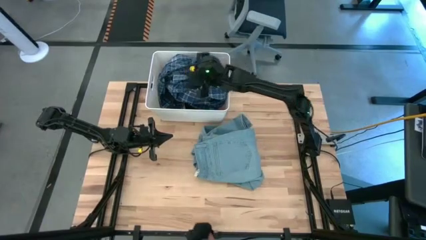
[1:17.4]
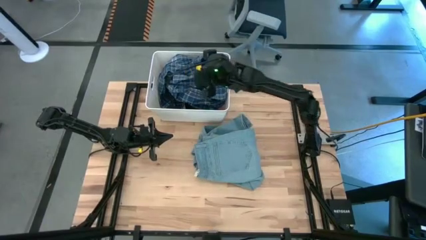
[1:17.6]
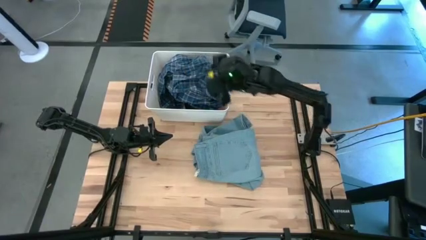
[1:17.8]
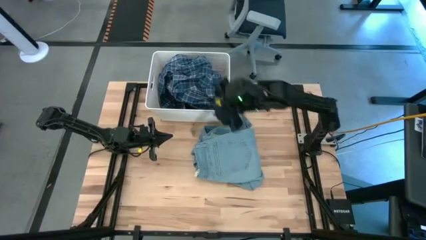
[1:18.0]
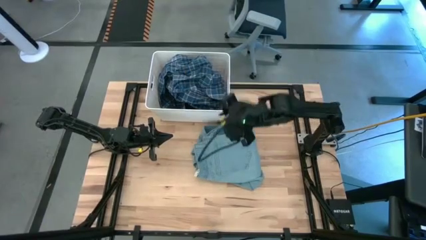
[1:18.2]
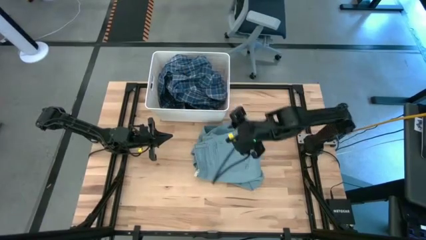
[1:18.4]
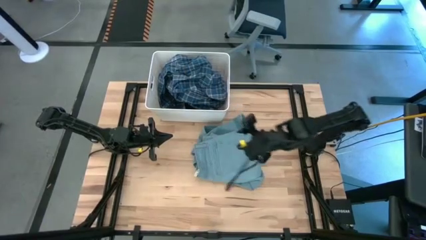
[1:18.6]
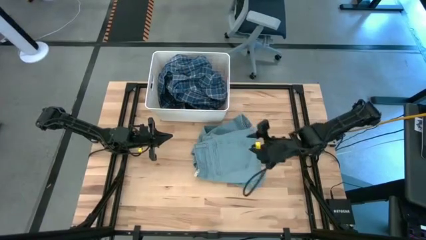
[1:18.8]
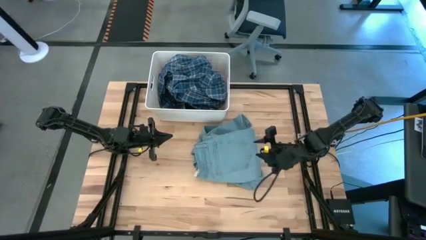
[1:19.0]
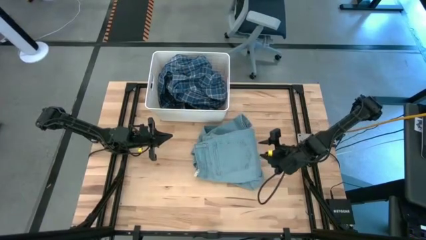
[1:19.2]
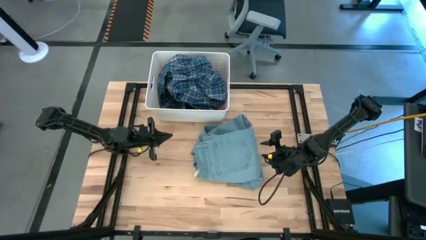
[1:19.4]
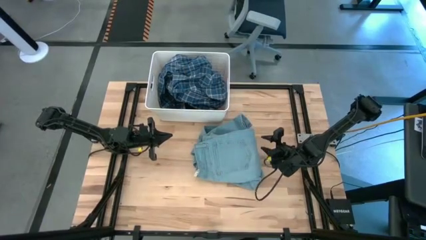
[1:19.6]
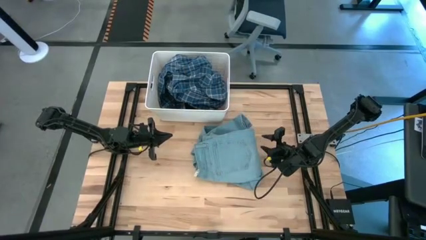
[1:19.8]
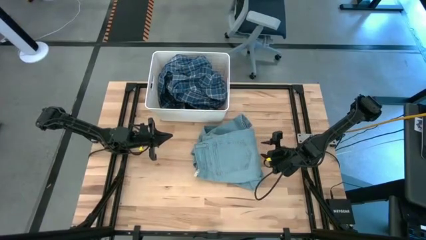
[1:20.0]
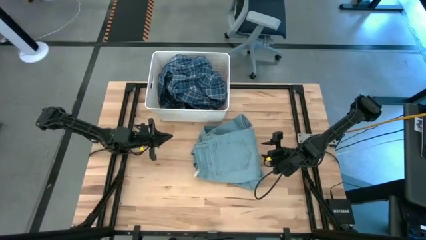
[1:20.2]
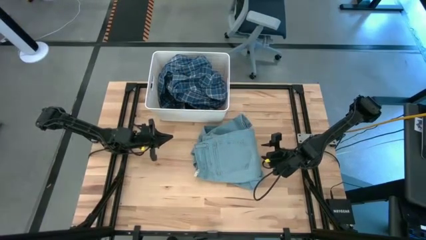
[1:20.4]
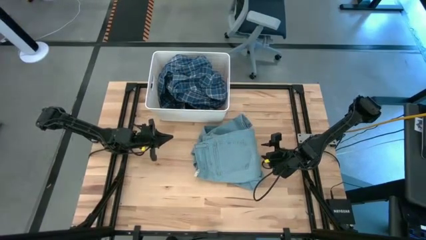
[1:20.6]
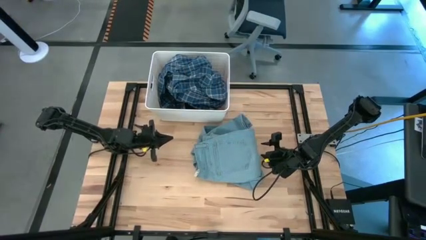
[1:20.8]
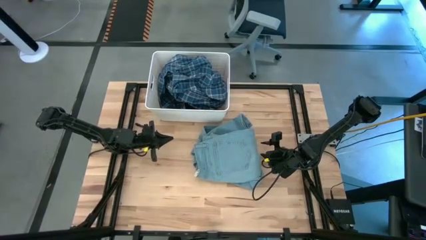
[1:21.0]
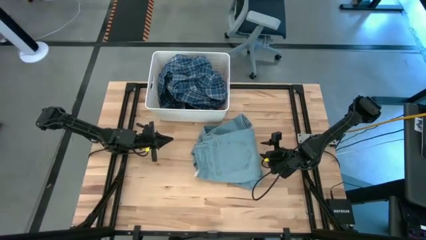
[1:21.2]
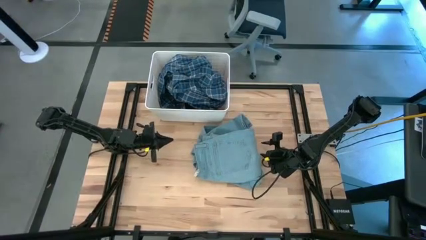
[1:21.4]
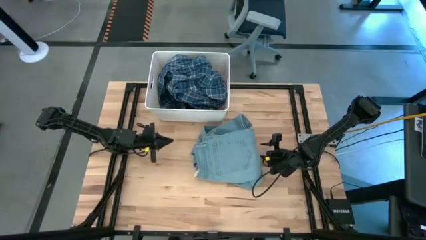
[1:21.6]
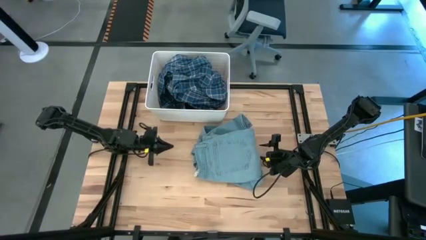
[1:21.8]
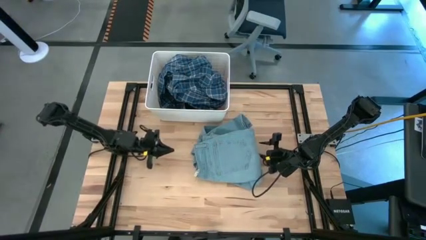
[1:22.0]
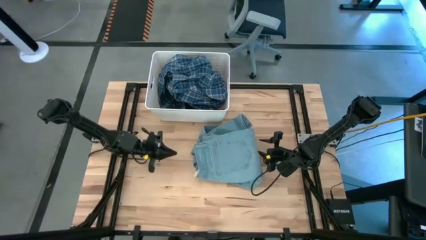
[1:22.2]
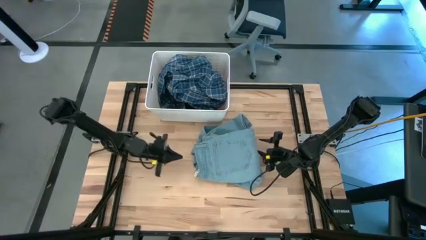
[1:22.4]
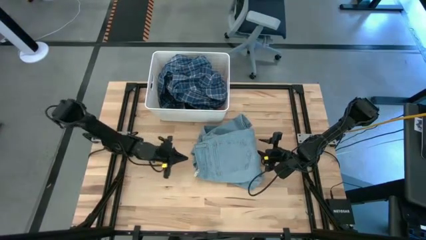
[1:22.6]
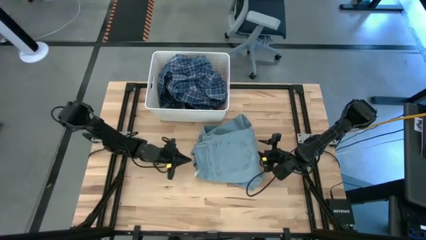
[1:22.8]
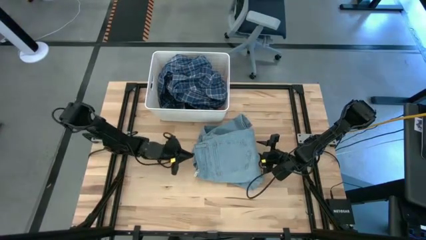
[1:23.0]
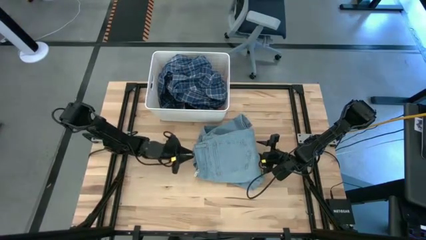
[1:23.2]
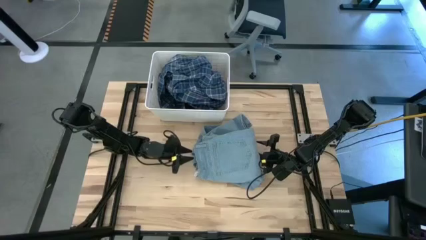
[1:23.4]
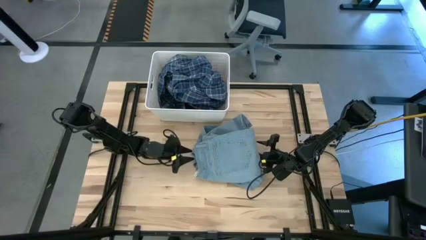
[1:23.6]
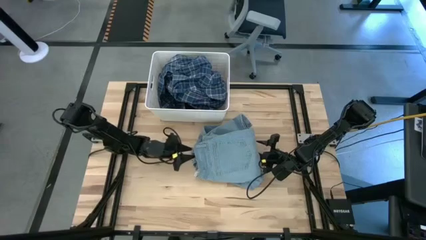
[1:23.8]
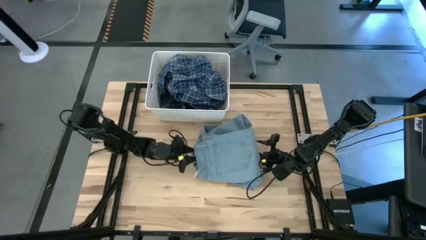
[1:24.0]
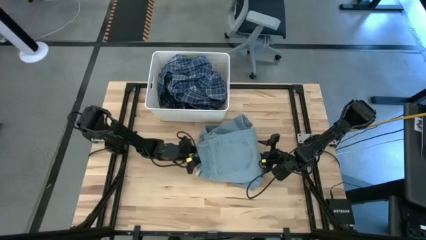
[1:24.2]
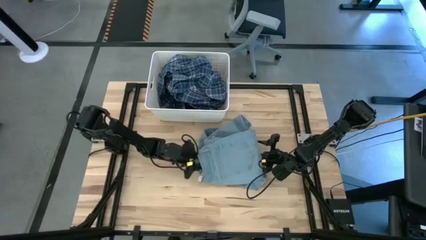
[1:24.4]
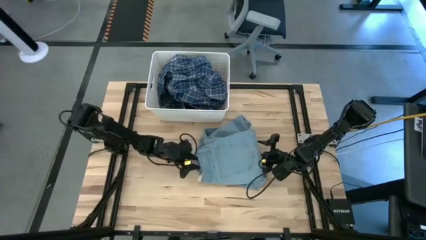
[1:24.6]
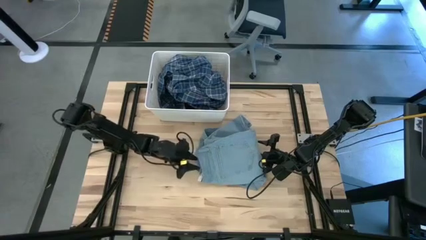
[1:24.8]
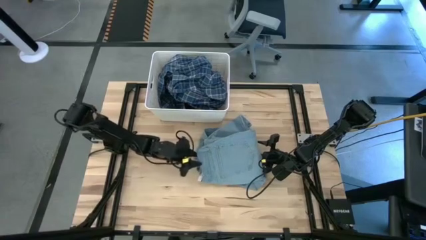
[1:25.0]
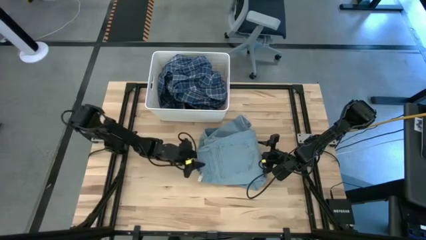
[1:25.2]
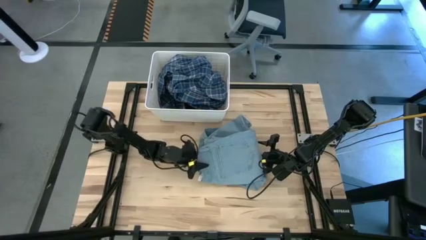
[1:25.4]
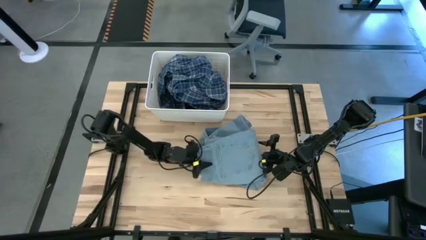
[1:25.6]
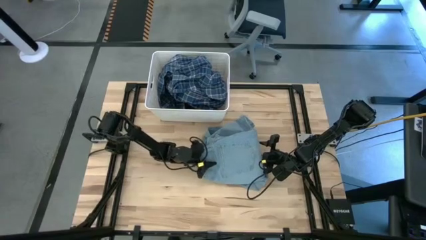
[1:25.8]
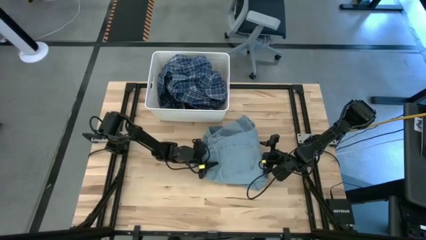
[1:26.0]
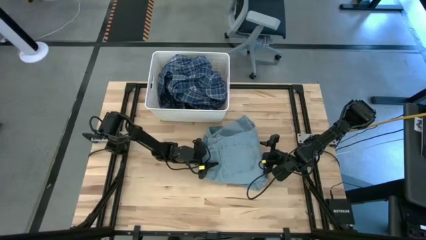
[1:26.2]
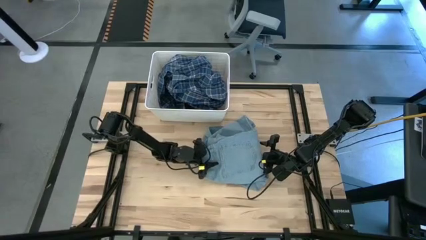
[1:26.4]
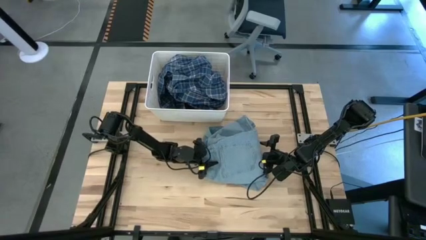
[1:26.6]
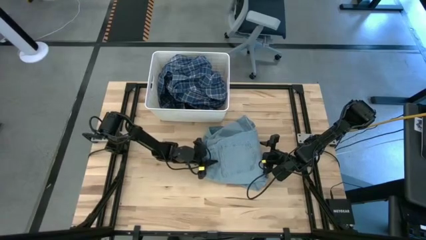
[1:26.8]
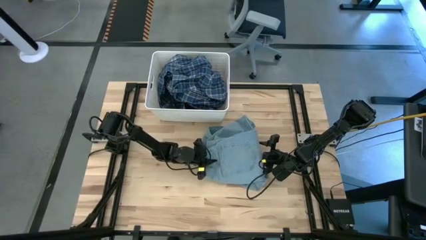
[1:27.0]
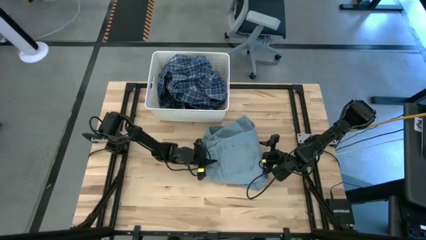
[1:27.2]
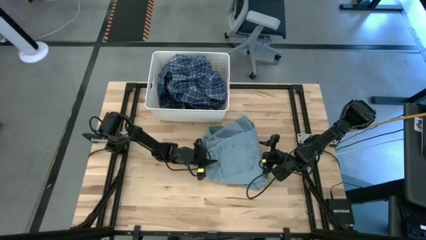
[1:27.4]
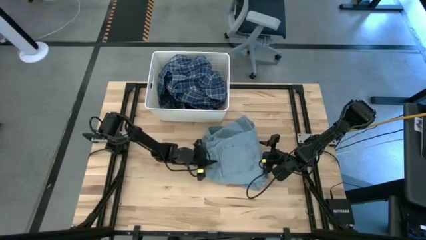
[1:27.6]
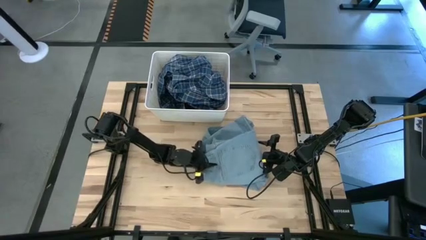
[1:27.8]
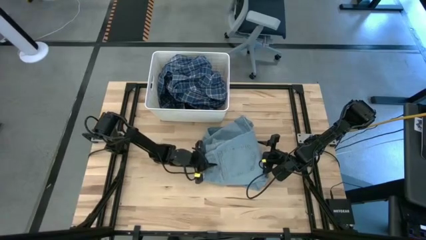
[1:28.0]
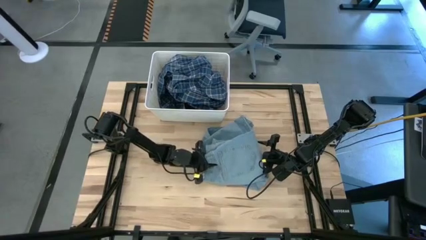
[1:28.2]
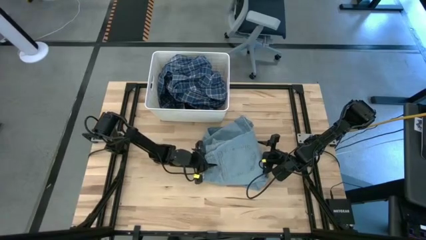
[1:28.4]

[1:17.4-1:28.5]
Task: Sort clothes
Put the blue pants into the white bin

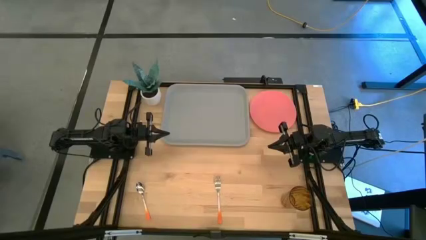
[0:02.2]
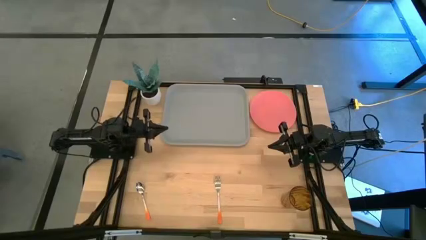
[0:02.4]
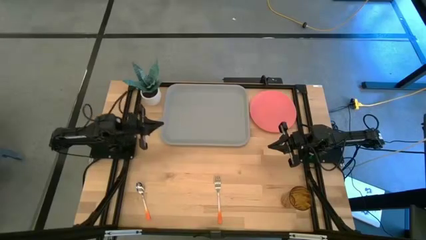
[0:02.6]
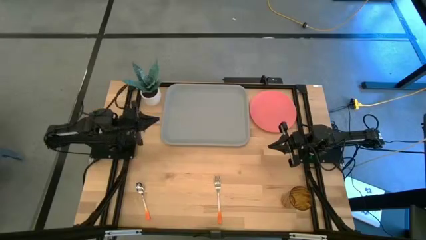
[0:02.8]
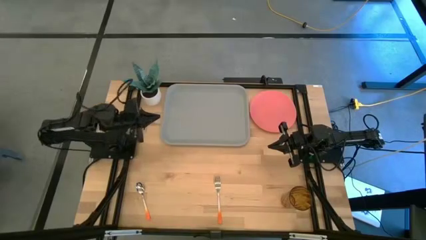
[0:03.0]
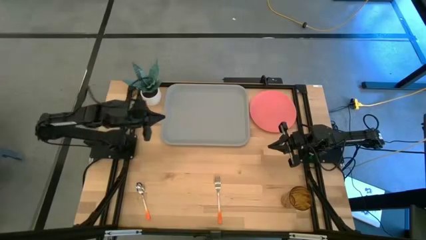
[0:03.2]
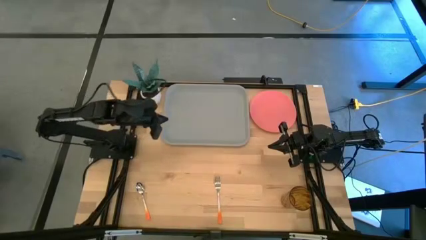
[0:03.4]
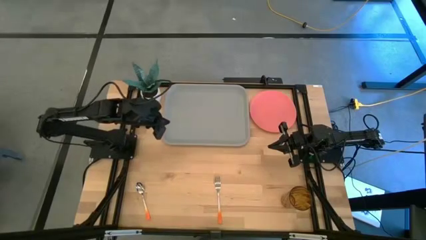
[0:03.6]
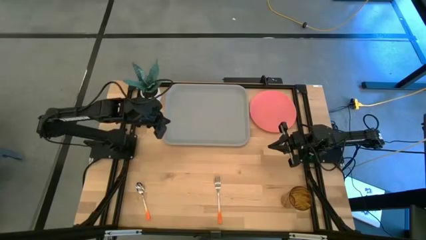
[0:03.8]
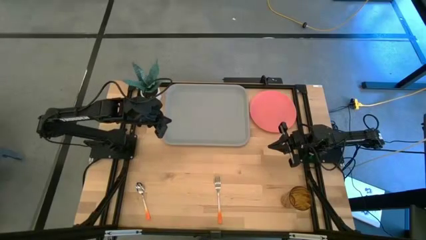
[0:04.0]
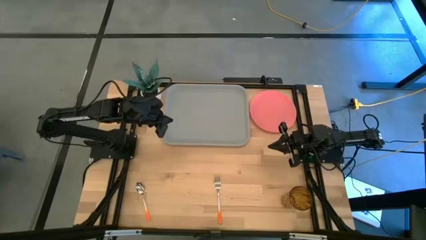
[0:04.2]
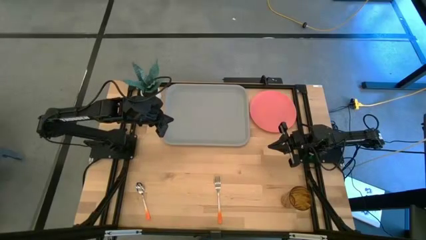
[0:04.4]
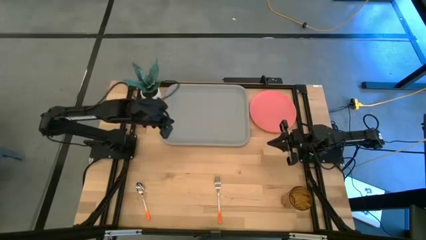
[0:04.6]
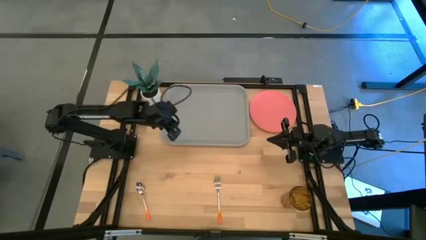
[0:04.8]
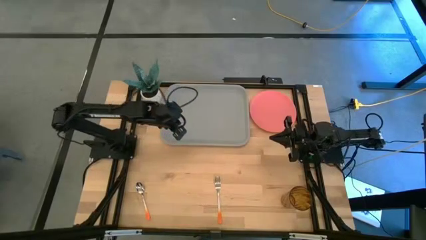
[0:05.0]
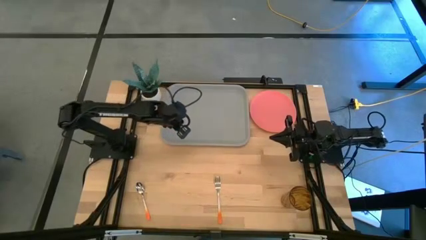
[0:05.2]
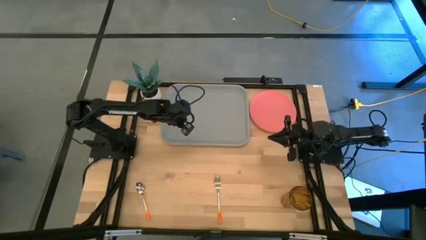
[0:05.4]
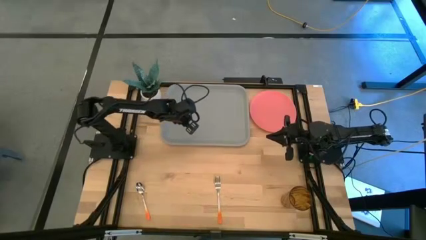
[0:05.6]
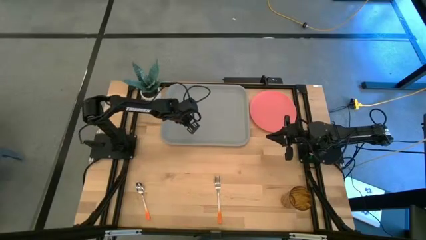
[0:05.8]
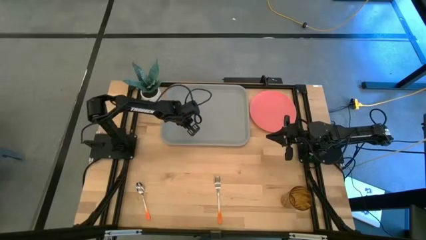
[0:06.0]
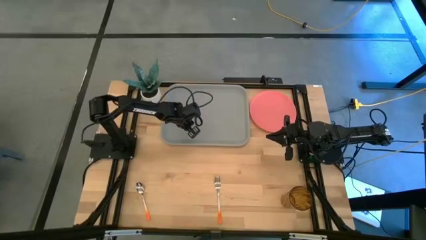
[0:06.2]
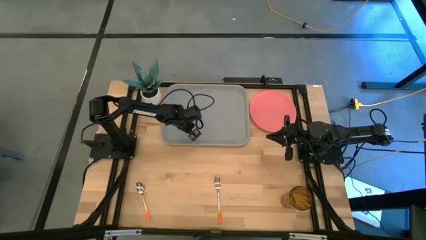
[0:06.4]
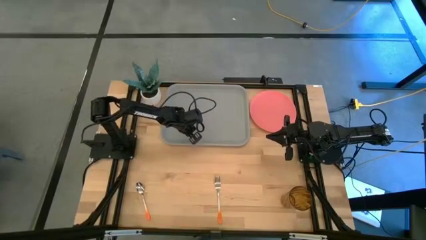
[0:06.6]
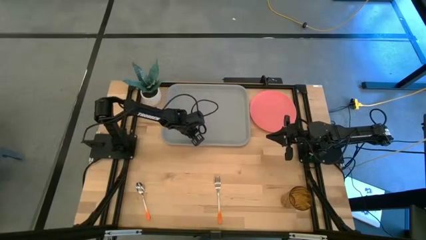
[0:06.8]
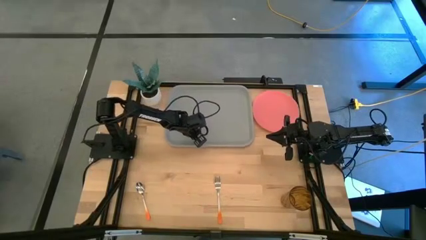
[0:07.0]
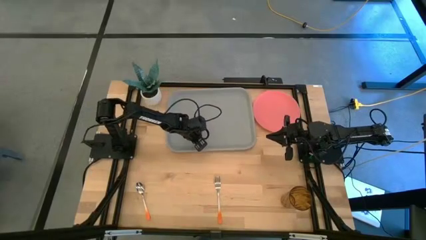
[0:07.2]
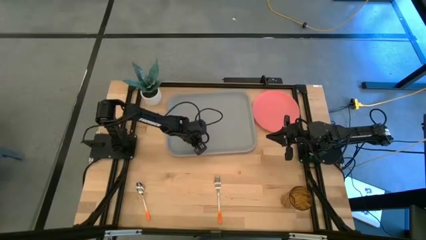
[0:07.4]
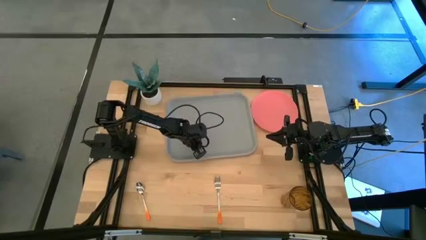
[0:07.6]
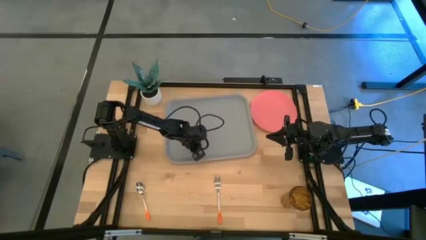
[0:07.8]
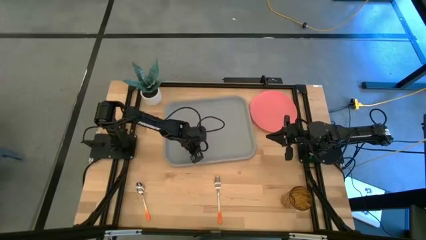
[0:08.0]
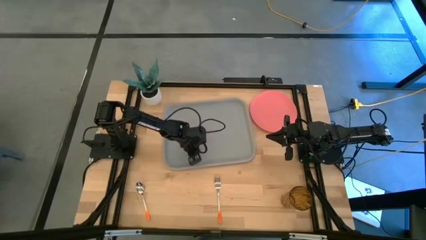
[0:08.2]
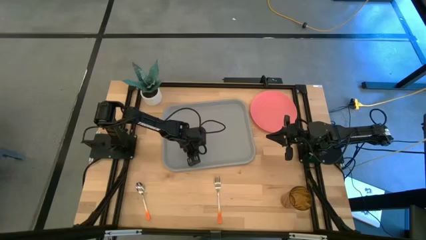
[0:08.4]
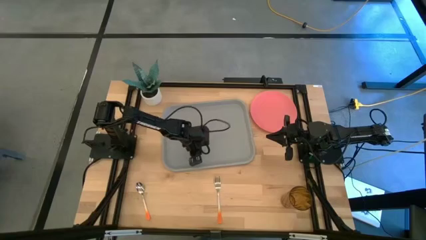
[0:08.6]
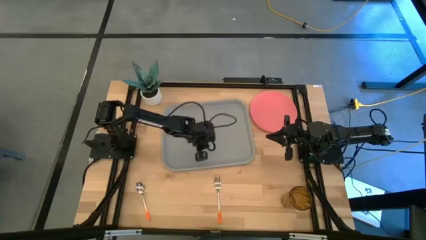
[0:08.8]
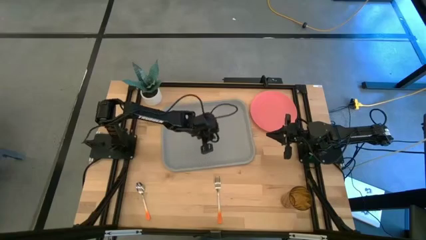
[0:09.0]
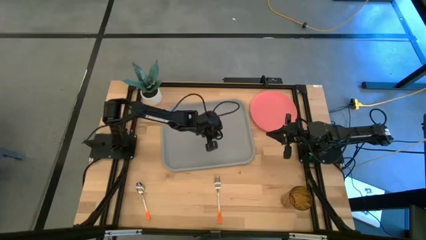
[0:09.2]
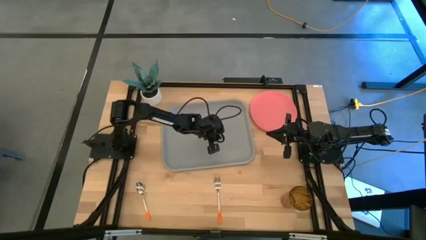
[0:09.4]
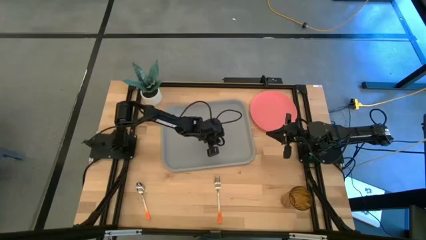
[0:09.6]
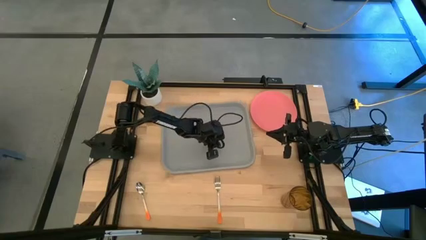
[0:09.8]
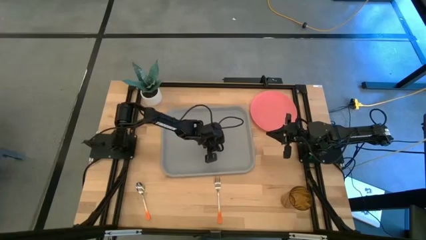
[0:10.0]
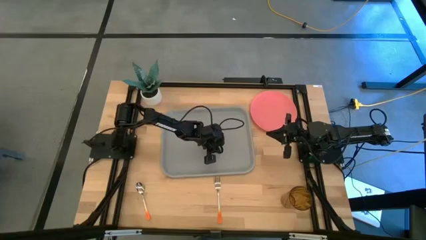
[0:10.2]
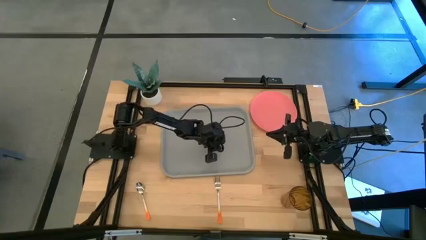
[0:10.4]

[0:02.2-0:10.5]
Task: Pick and place plate/cup/fork/spoon on tray
Move the gray tray to the center of the table
